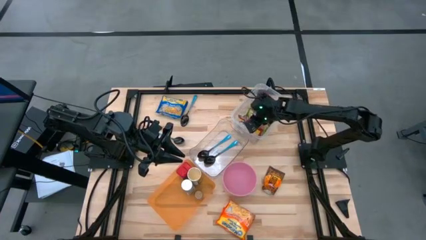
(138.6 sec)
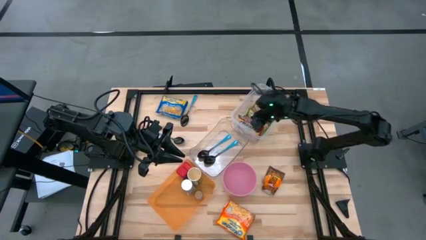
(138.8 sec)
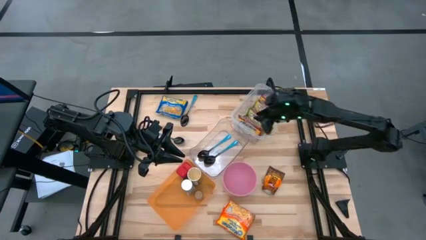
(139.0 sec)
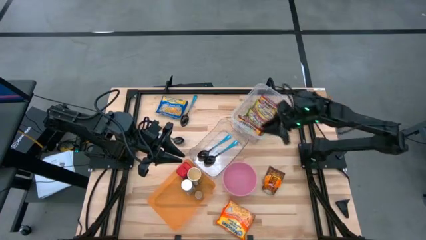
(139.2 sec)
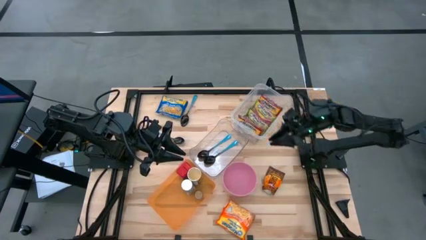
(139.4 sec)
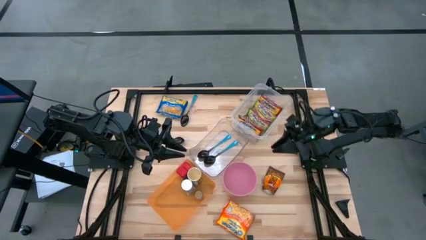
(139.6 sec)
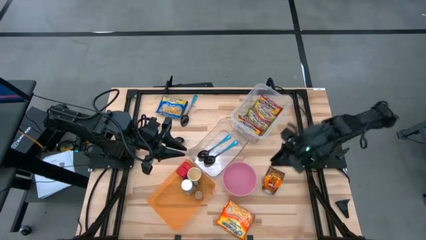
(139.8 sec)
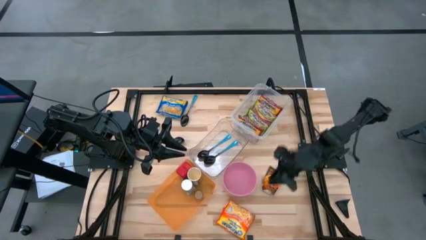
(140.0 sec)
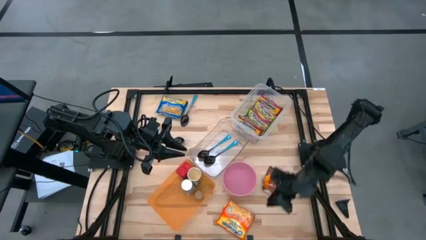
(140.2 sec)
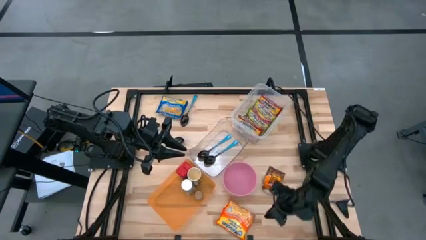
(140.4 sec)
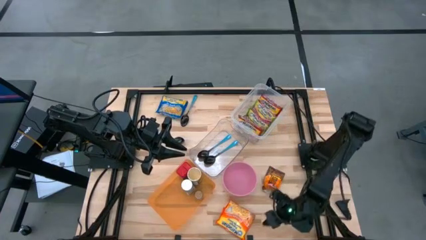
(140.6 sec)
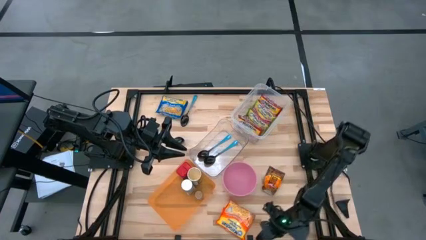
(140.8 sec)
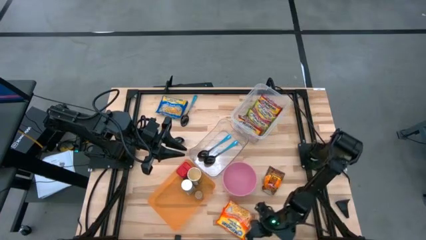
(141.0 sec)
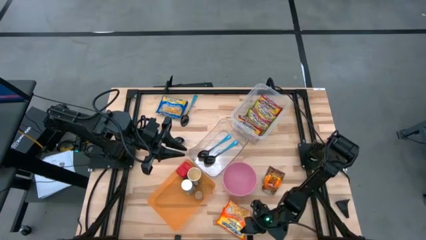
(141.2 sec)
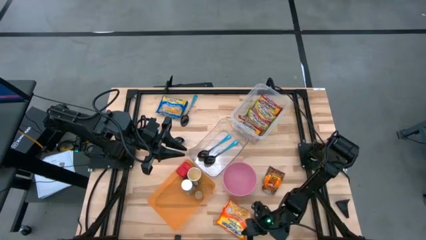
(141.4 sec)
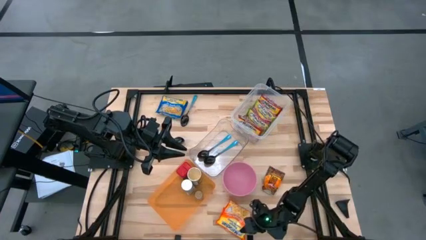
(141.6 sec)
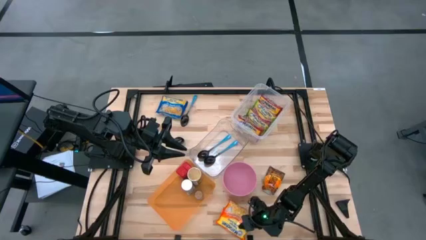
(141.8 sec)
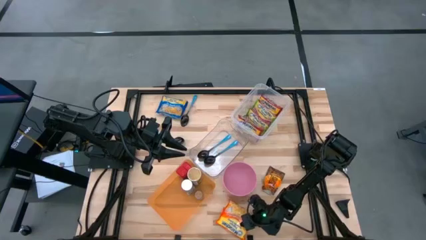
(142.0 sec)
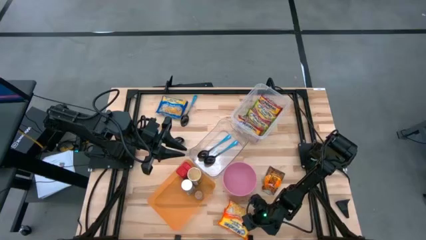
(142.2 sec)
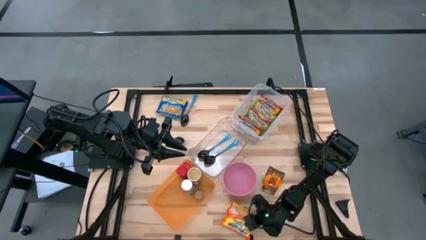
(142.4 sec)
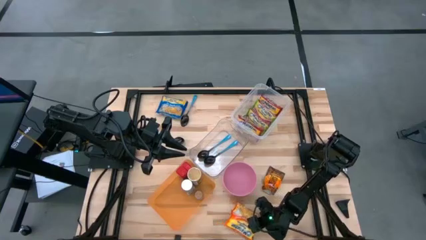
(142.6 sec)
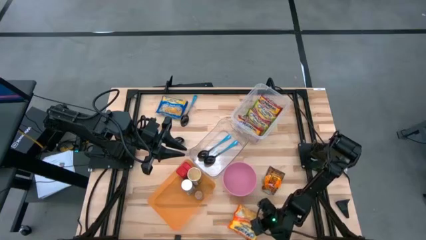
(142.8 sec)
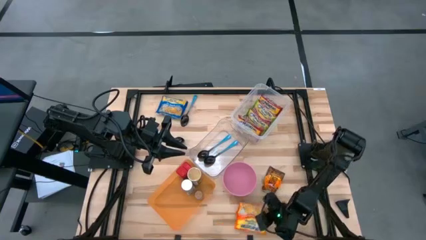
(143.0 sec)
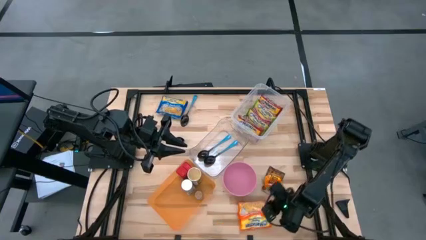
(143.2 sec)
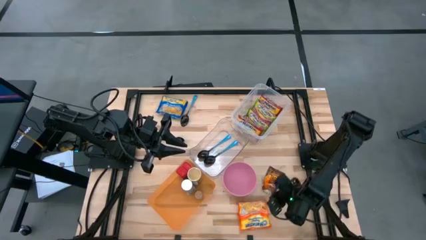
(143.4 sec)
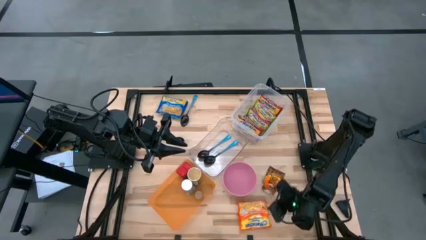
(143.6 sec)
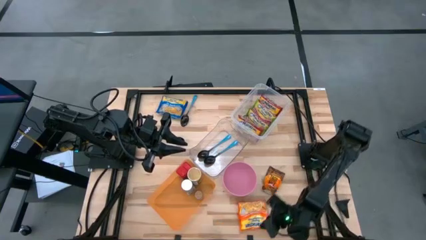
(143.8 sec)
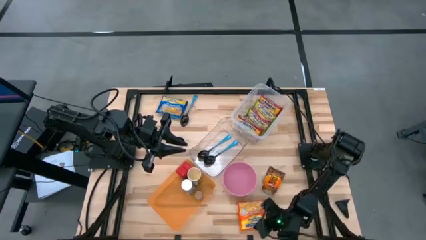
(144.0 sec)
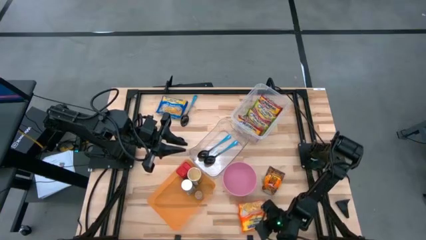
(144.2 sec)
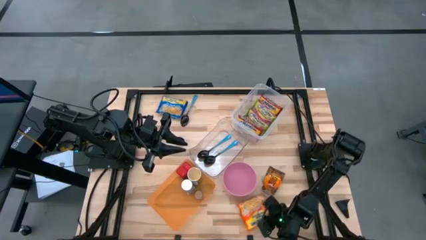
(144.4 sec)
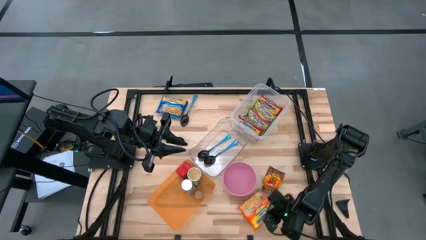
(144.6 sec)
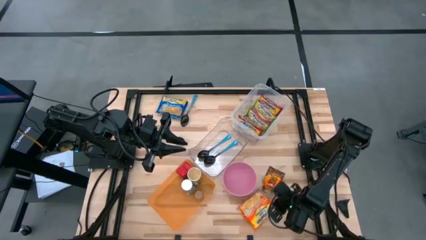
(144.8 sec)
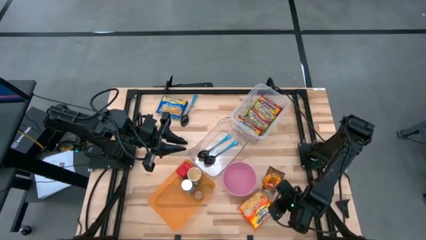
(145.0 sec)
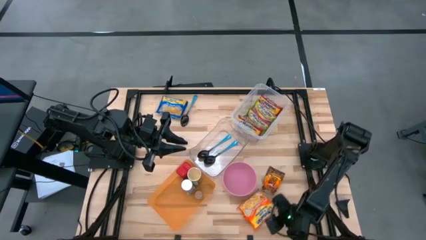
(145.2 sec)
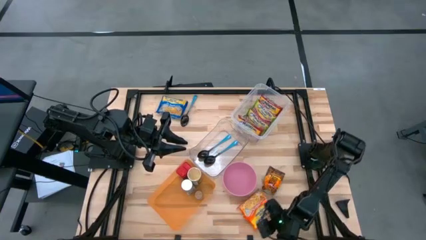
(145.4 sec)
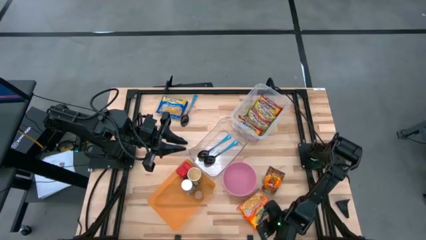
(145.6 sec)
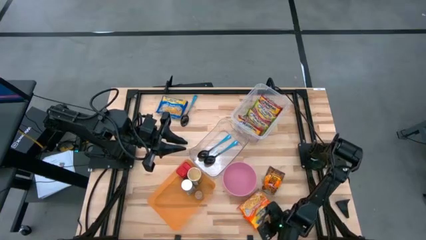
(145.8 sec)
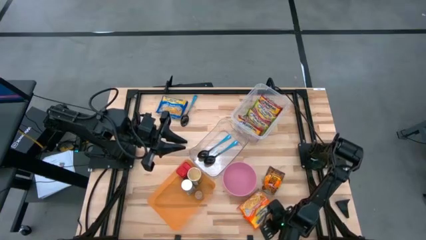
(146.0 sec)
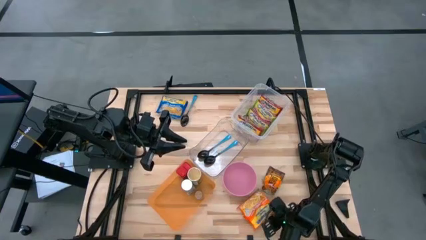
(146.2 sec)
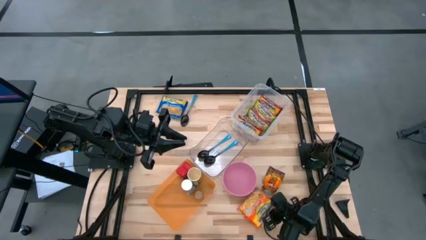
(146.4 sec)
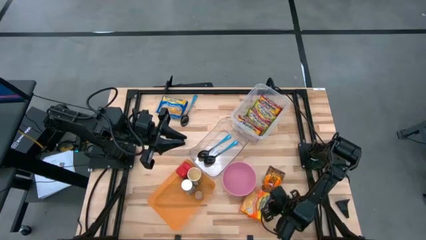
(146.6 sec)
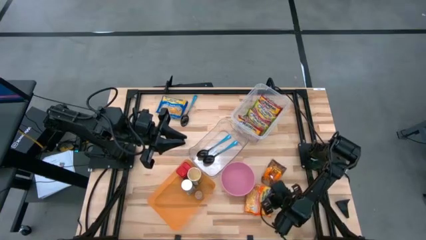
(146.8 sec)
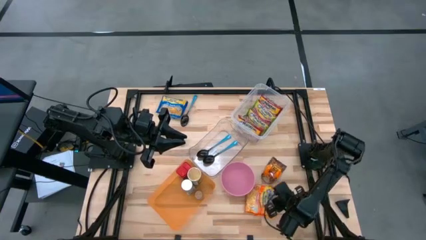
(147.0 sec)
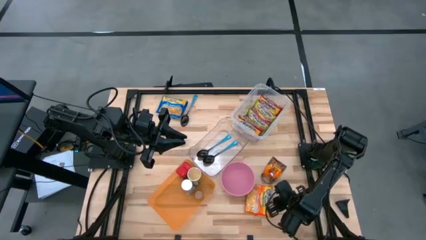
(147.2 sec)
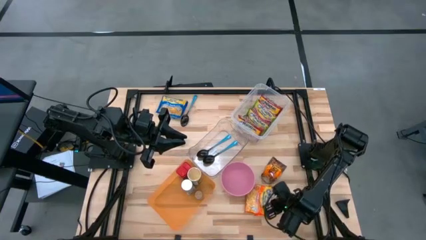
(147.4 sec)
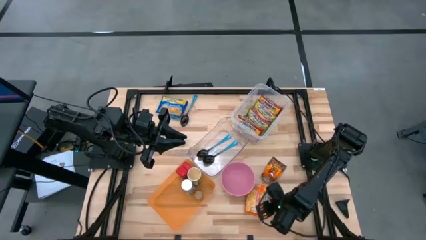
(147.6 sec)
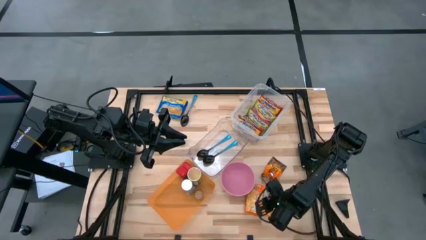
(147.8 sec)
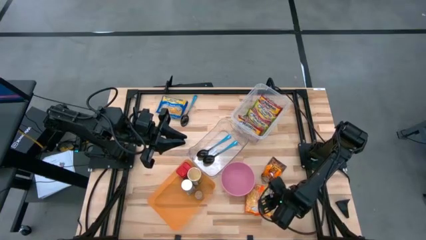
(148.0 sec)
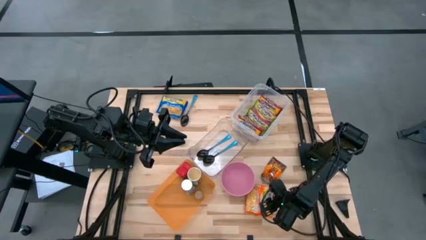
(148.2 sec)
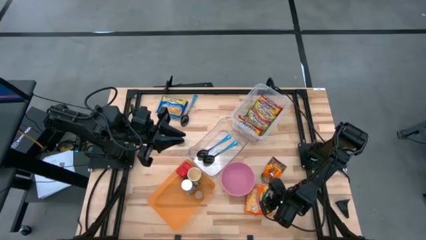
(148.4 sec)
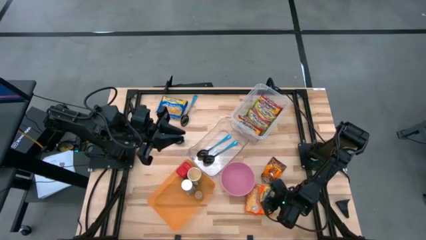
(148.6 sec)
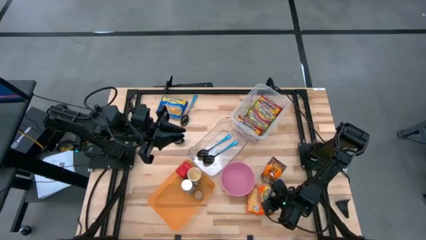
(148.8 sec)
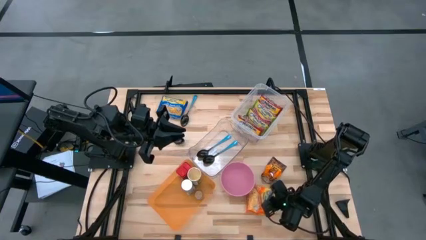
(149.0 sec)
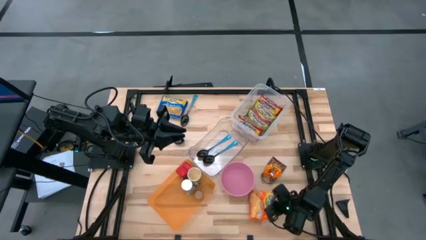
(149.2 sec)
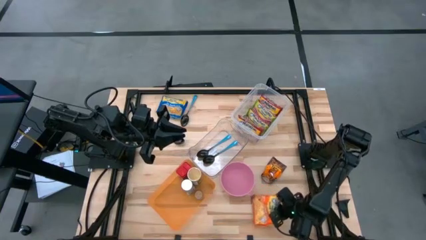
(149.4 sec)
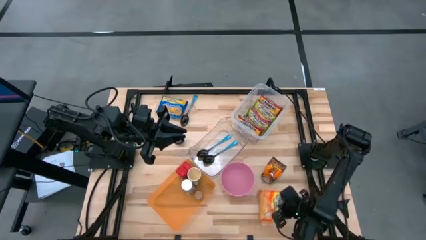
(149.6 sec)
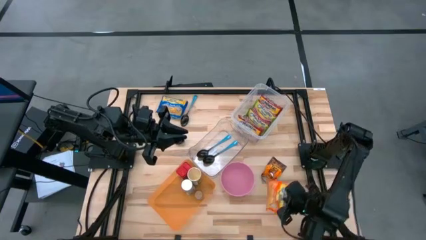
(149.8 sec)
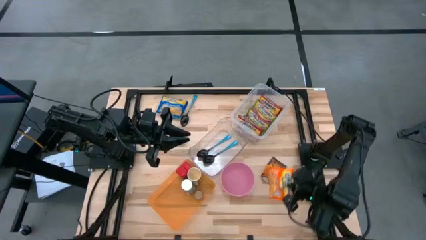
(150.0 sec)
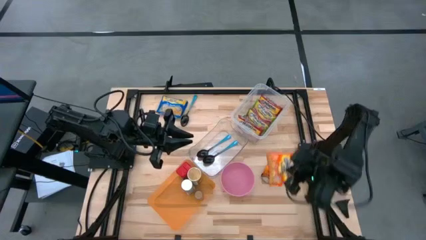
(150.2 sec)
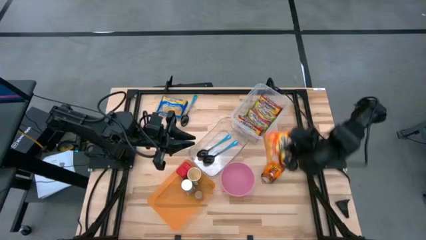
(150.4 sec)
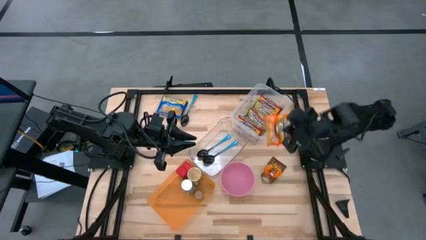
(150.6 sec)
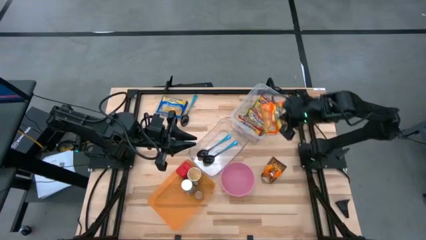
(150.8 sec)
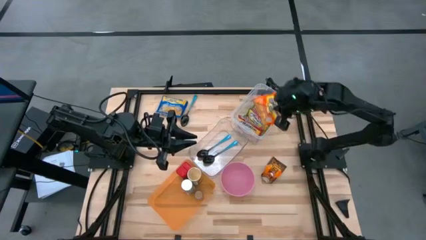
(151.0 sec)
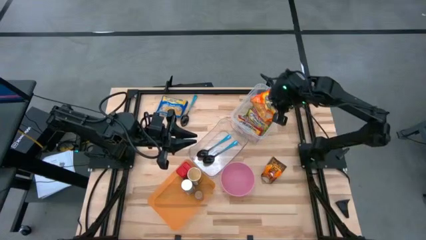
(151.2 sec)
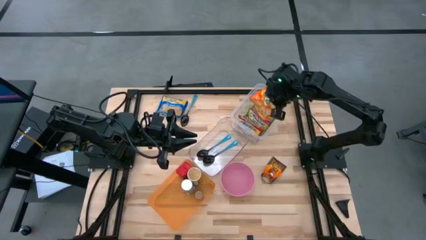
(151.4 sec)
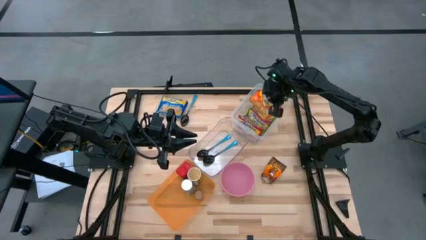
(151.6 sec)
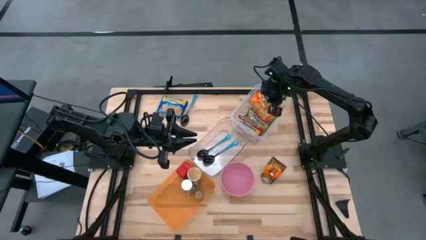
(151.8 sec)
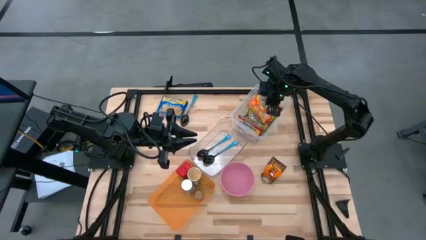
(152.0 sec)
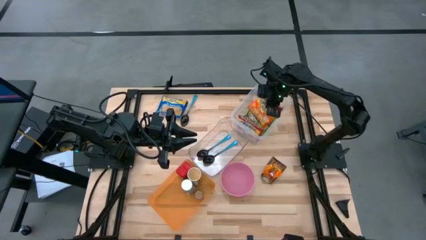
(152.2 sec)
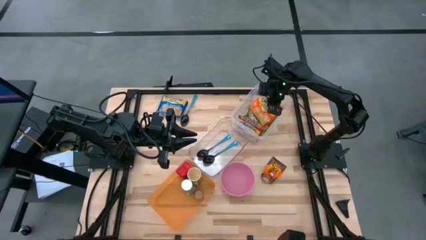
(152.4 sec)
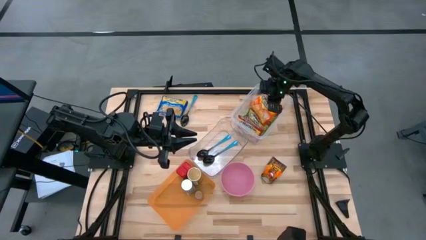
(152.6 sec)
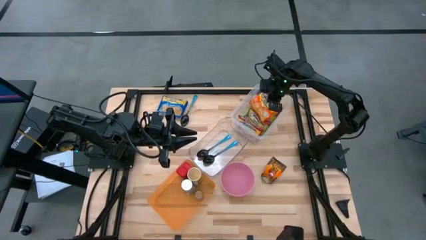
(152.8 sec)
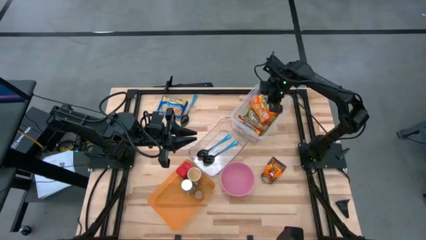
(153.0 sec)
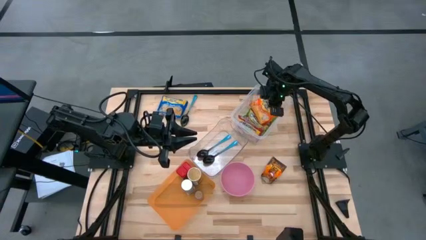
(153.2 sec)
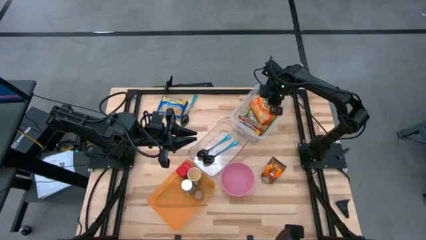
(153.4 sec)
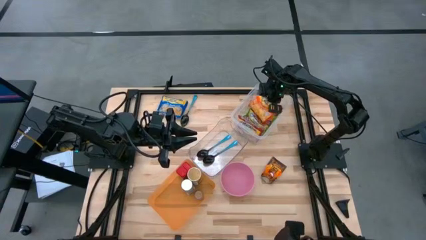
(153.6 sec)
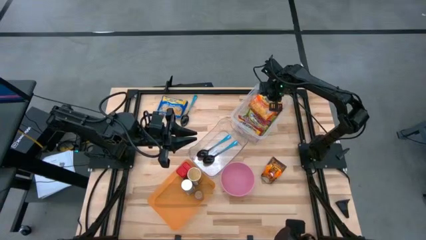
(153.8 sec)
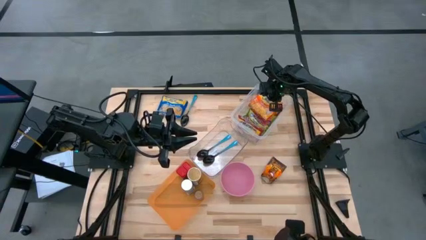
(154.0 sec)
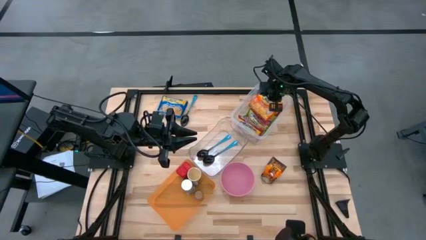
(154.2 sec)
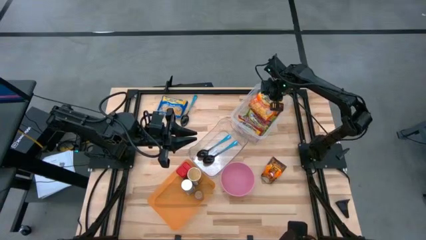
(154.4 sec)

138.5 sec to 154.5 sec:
Task: Pick & Place Food Item
Put the orange noodle pack into the transparent container
